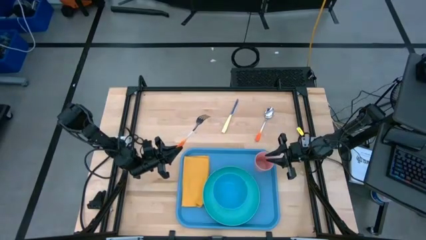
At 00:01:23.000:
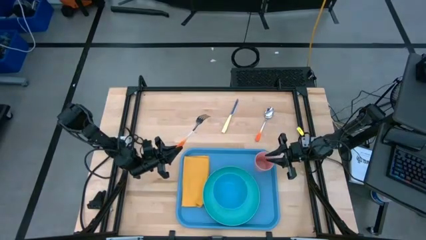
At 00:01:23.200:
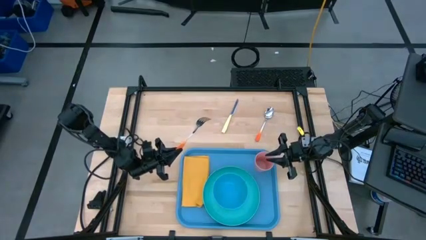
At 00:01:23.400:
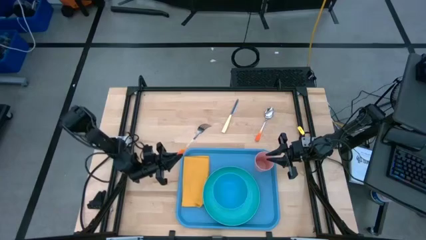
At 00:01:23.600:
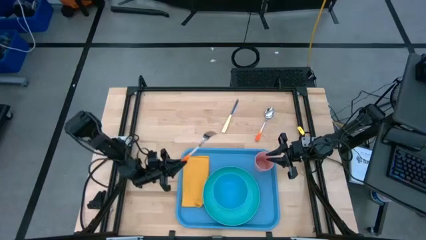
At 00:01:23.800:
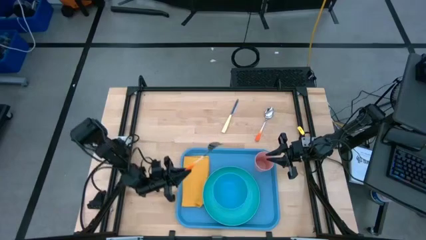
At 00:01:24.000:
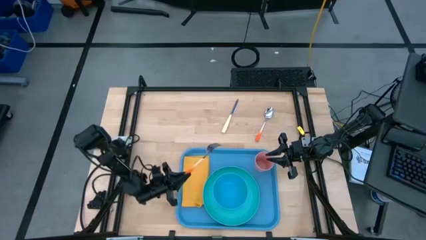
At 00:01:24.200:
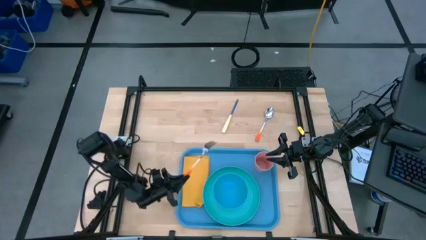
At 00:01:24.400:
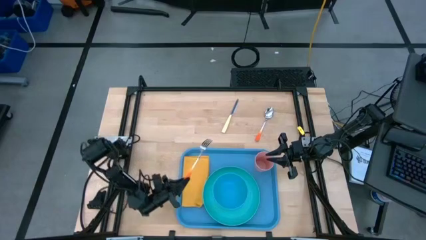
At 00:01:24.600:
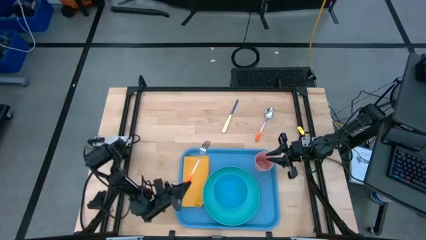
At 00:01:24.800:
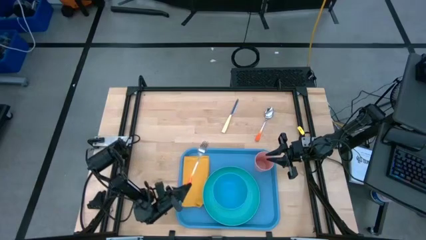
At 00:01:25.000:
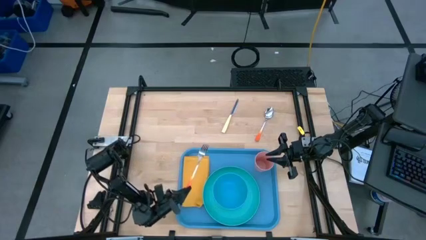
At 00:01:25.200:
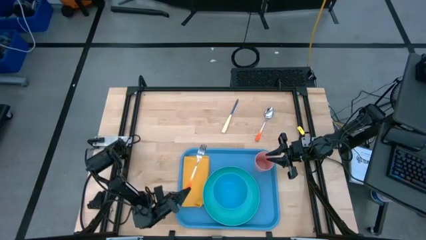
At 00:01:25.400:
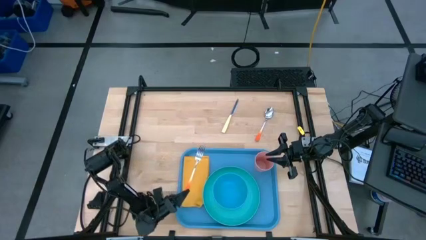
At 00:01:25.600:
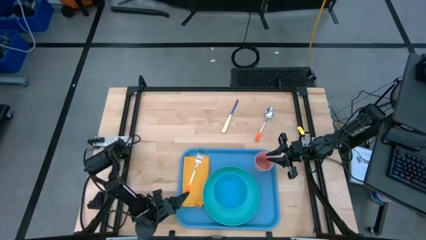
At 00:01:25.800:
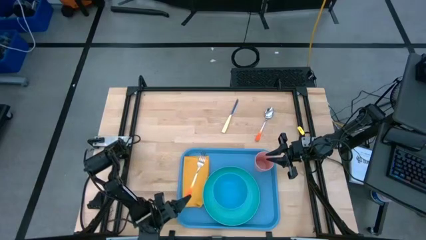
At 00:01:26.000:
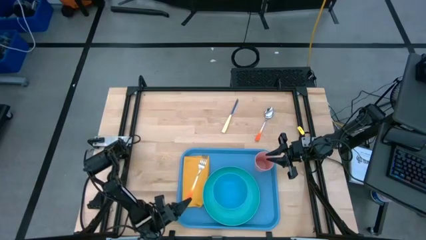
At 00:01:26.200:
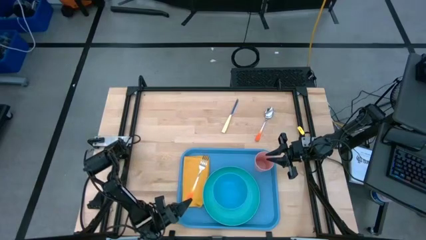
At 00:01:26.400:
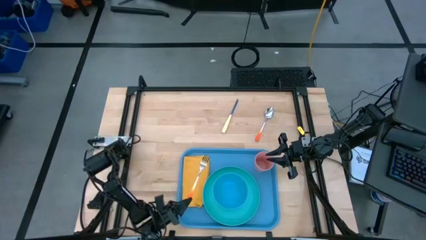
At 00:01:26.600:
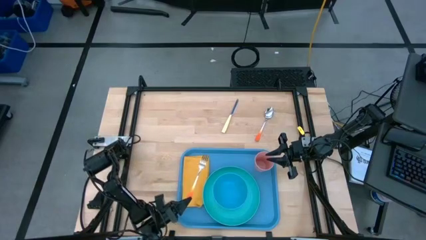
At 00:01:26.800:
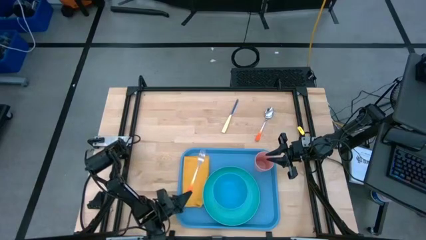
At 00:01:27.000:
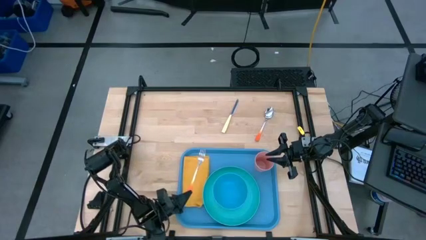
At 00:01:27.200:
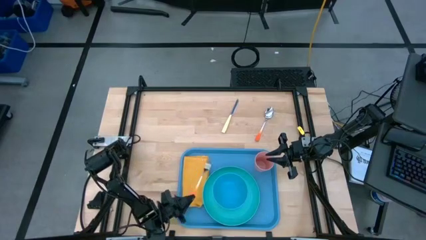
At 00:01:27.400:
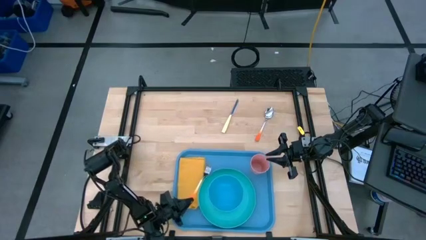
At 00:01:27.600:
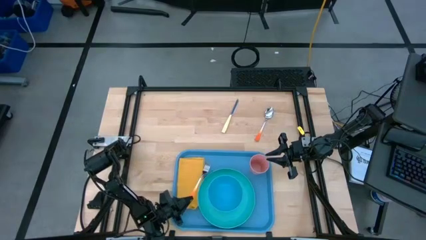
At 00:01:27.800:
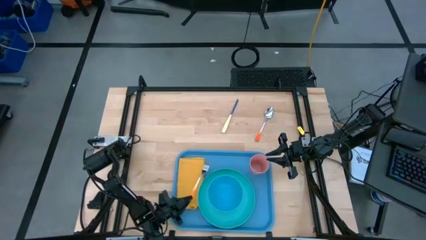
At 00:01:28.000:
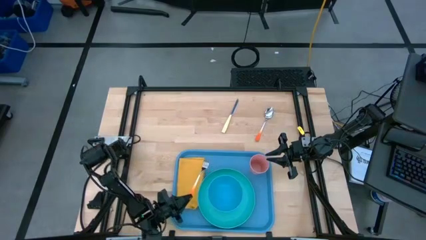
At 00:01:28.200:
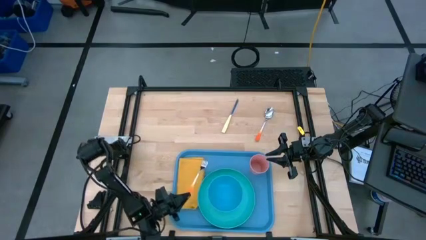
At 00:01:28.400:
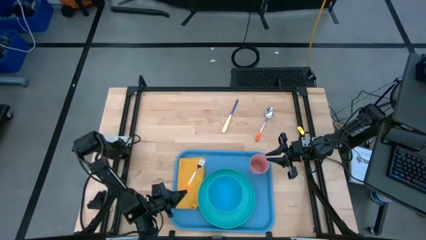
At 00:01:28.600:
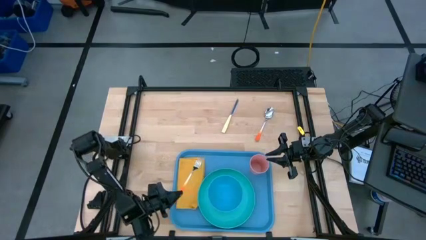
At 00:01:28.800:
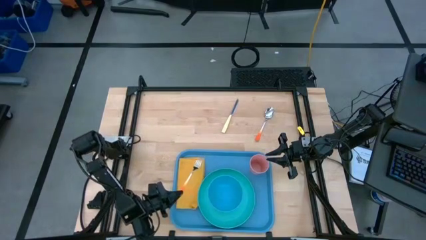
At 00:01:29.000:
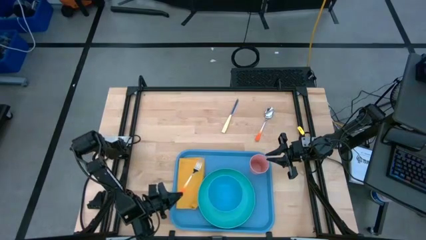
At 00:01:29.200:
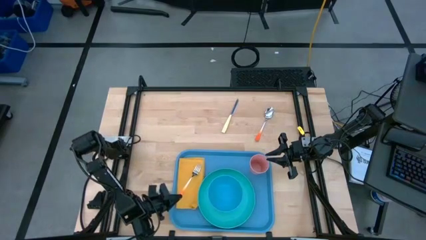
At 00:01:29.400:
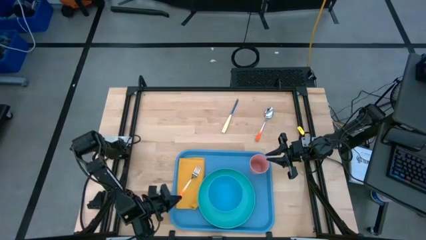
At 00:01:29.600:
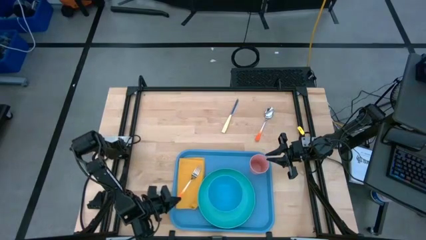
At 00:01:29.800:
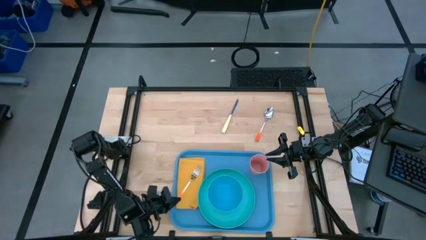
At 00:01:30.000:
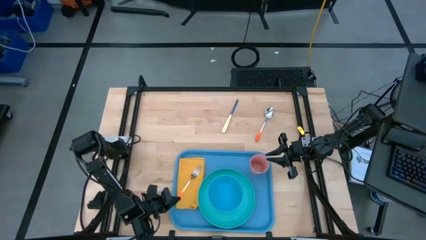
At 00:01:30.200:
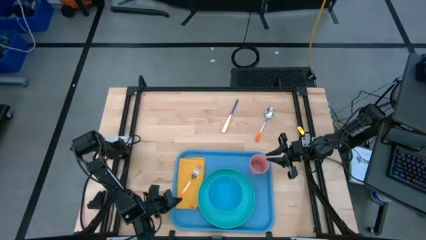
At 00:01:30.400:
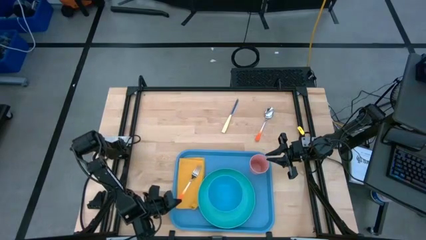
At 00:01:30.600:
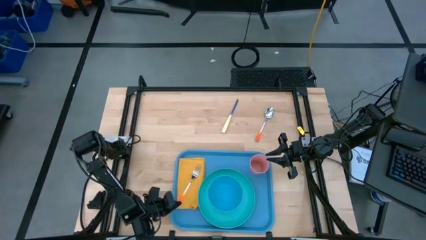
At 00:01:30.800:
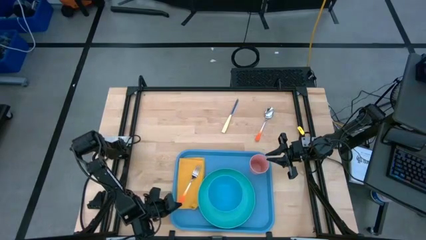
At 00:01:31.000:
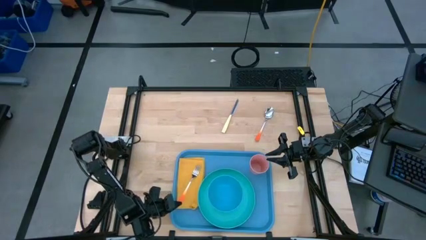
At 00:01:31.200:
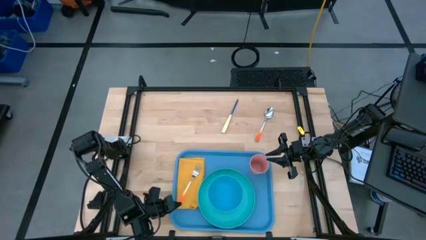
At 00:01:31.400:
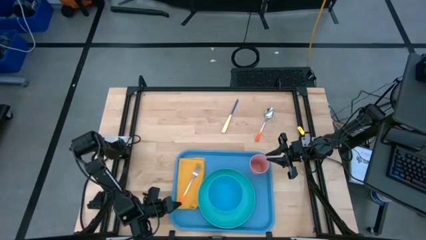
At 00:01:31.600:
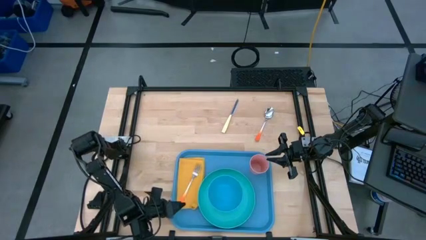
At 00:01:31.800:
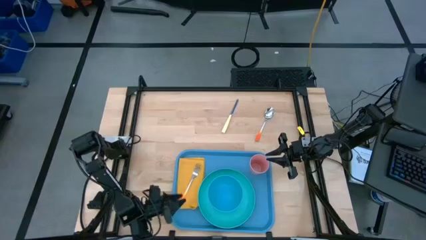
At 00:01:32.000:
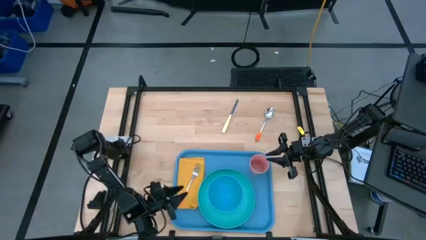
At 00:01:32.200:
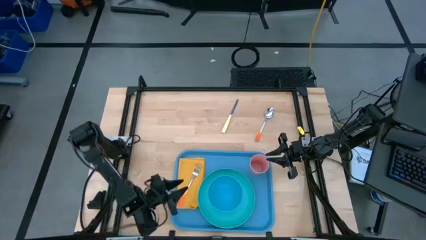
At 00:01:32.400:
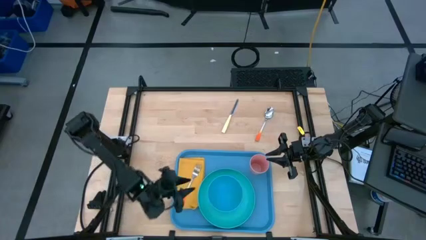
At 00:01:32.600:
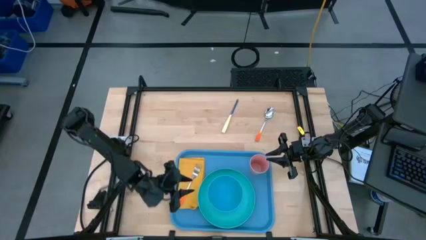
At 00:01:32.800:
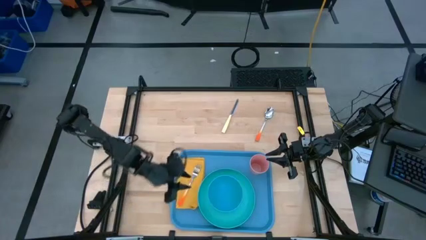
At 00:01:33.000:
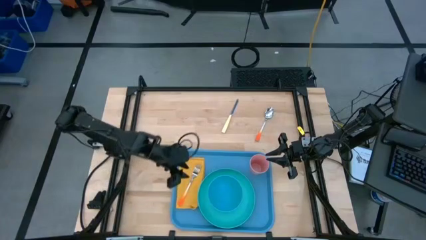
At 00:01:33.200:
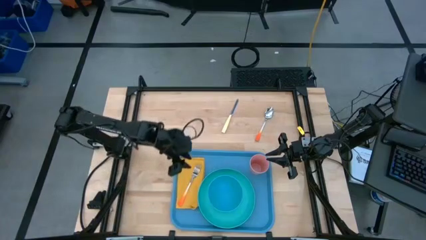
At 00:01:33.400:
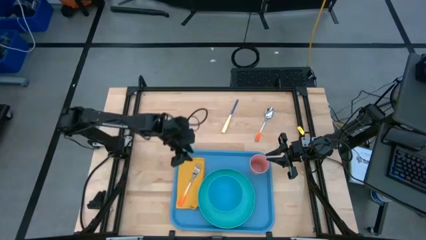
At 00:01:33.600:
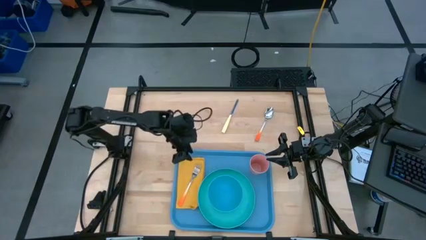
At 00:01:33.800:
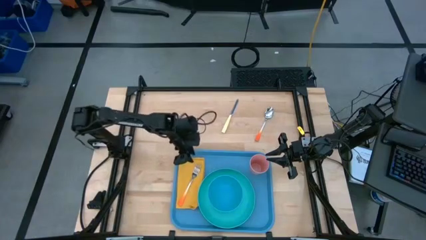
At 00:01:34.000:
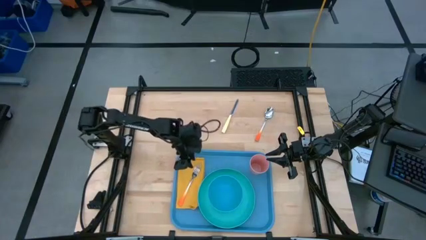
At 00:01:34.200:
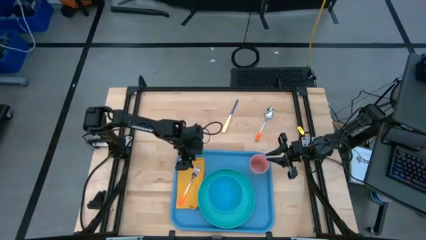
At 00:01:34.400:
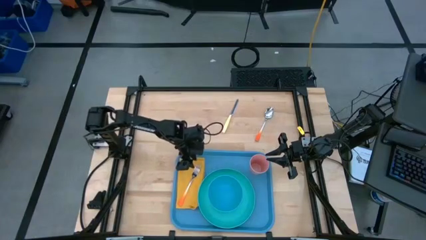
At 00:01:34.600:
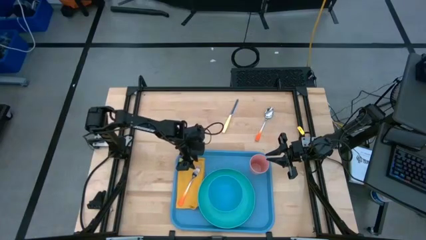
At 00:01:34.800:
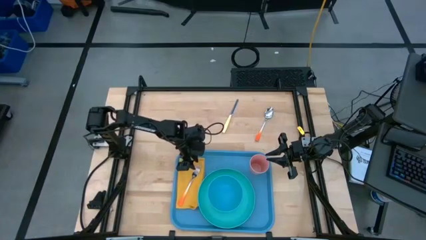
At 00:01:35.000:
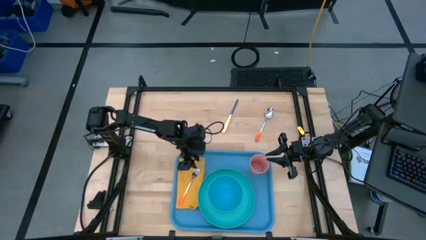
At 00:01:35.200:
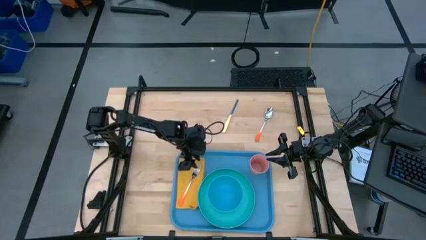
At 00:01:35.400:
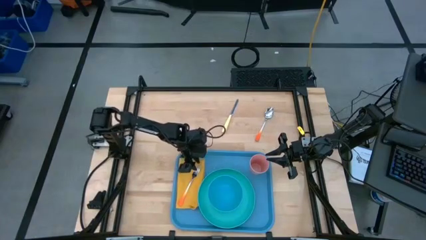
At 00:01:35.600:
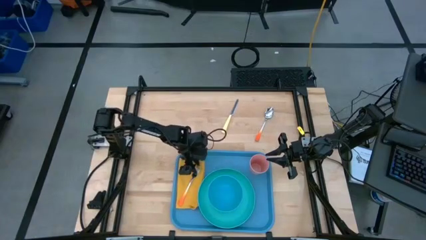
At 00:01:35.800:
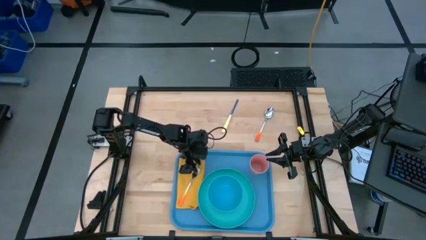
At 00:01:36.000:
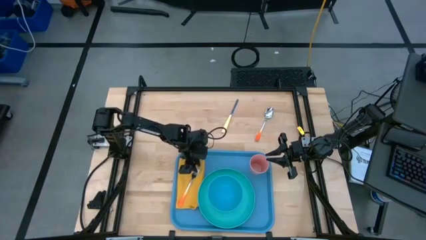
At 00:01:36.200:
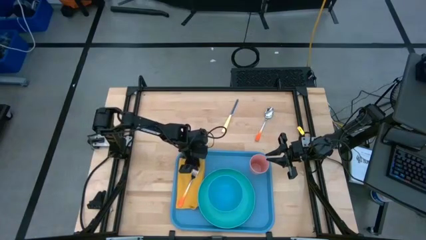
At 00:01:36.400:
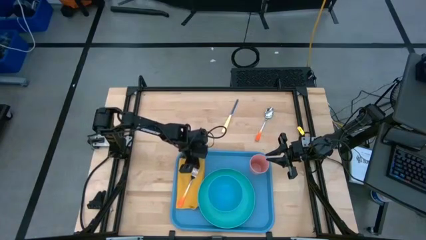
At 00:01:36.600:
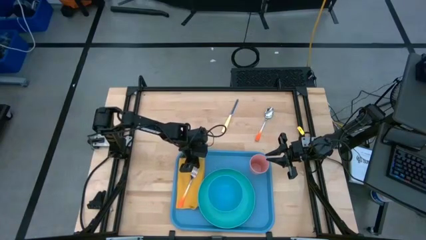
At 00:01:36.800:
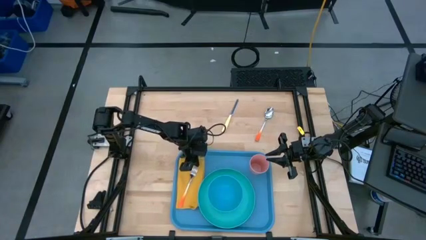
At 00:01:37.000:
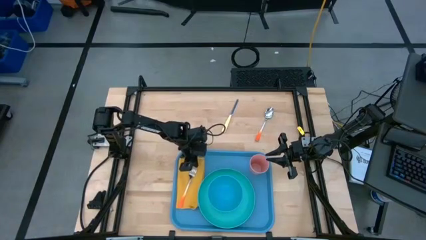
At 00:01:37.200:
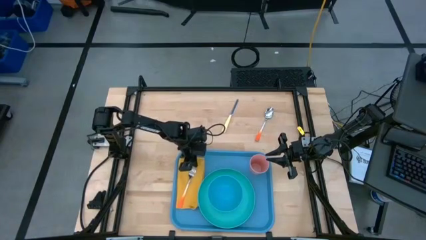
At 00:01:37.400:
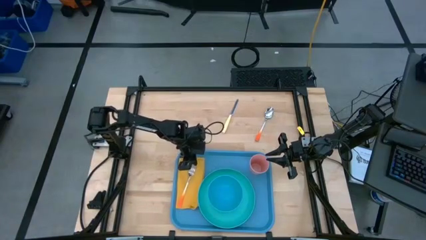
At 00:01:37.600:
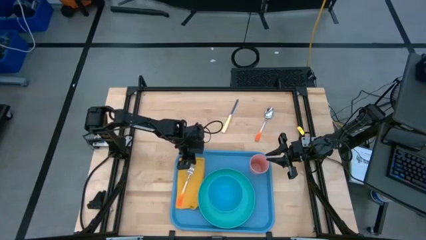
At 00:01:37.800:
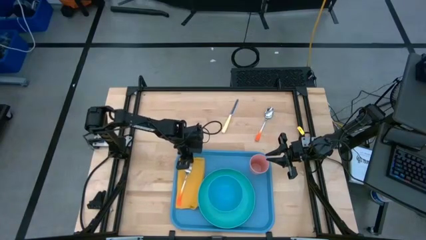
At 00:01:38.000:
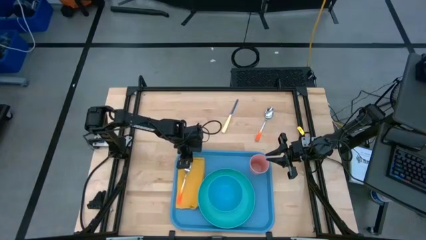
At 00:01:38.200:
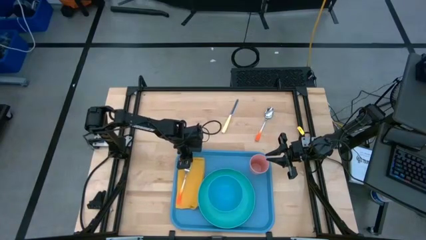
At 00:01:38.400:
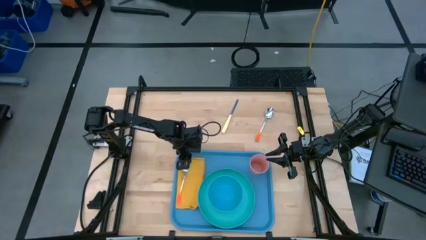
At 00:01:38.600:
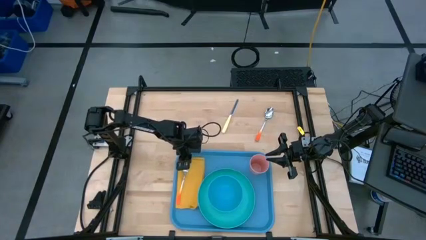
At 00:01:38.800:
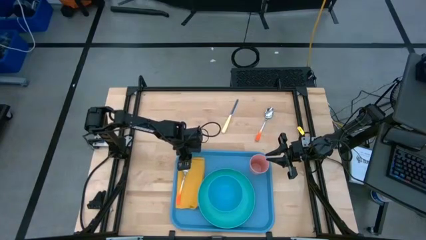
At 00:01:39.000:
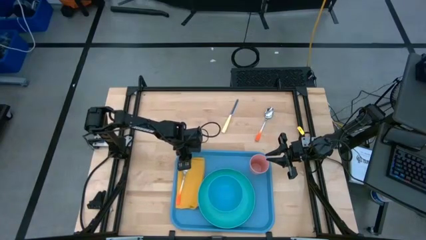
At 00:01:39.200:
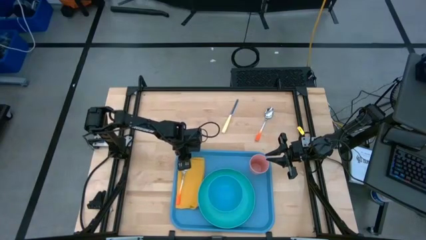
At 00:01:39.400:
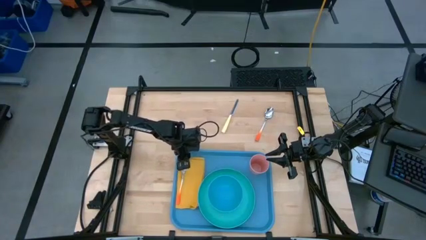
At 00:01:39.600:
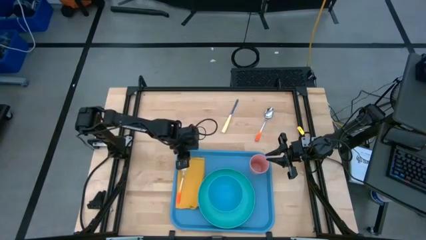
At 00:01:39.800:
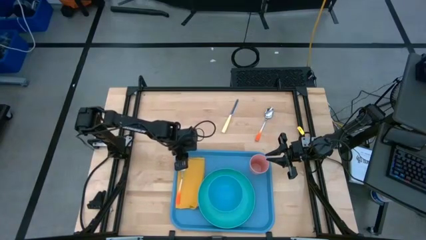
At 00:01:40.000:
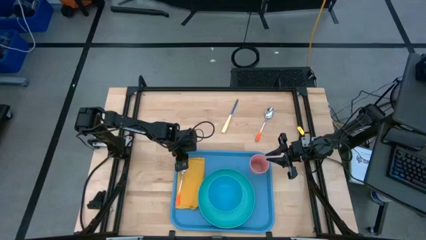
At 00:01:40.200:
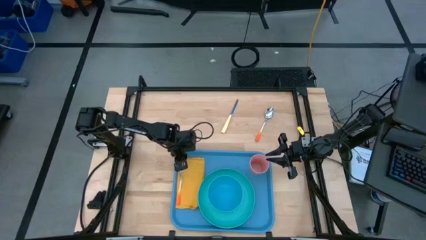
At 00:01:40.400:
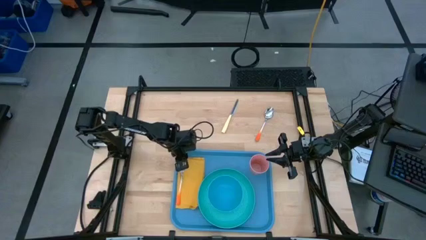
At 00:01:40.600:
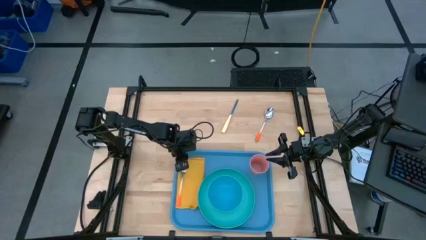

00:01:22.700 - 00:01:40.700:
Task: Set up tray
Put the orange fork on top of the orange napkin on the blue serving tray
